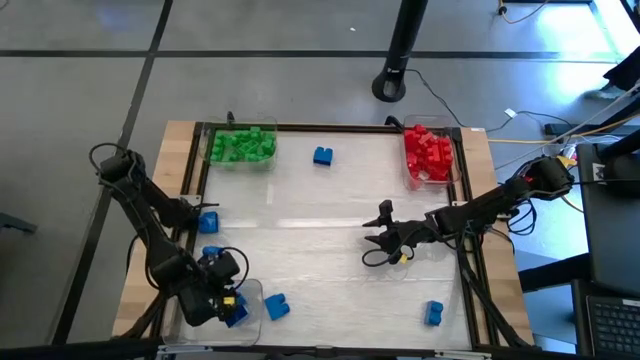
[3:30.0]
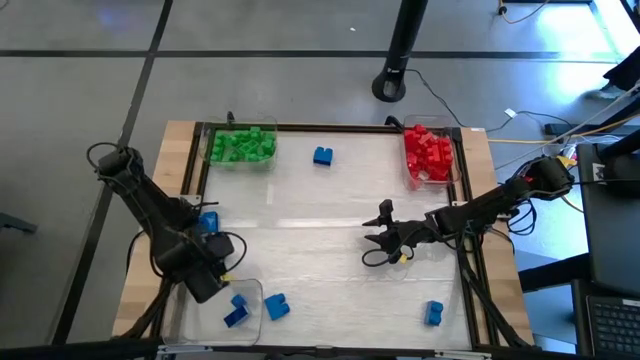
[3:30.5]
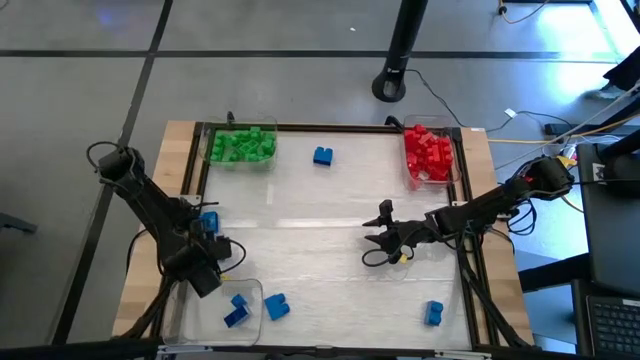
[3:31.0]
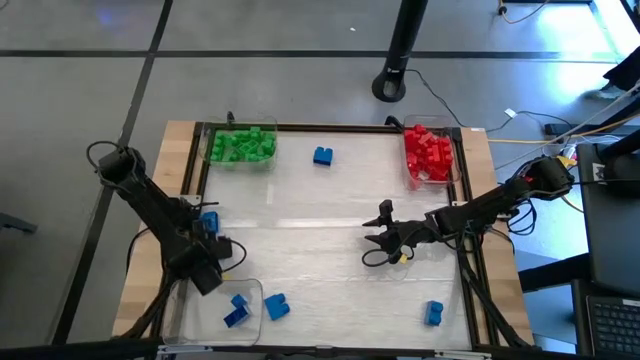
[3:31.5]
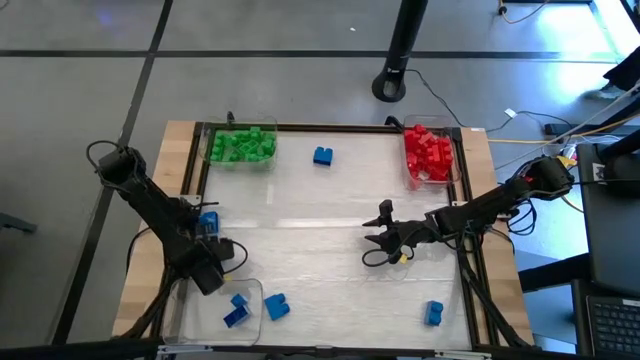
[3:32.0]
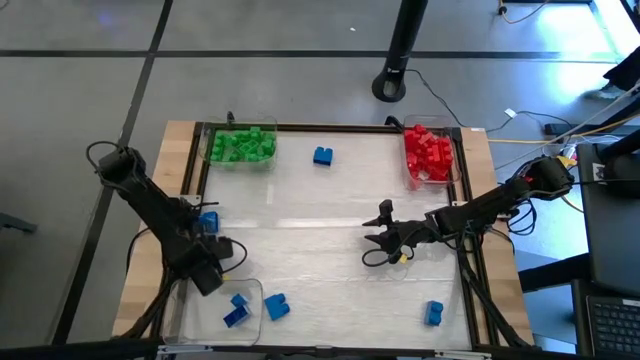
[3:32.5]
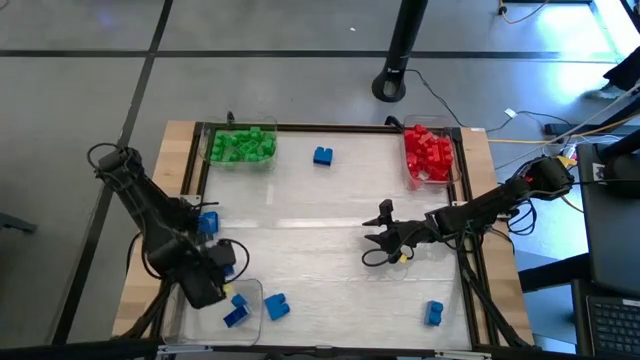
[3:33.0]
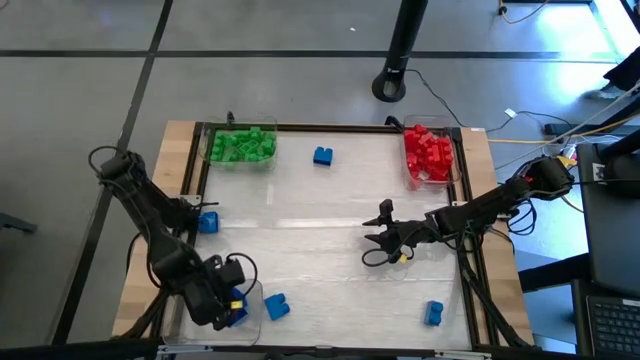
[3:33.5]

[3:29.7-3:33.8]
Task: Sort blocks
Put the blue game piece into the bottom transparent bin

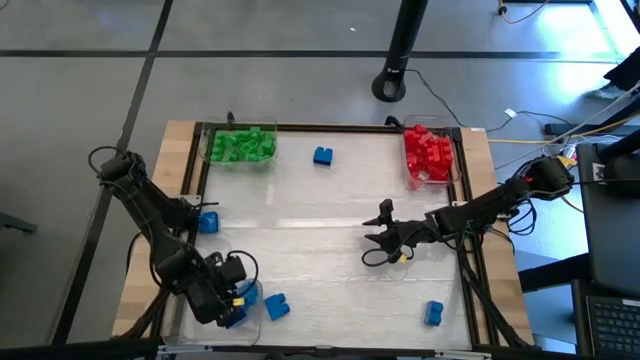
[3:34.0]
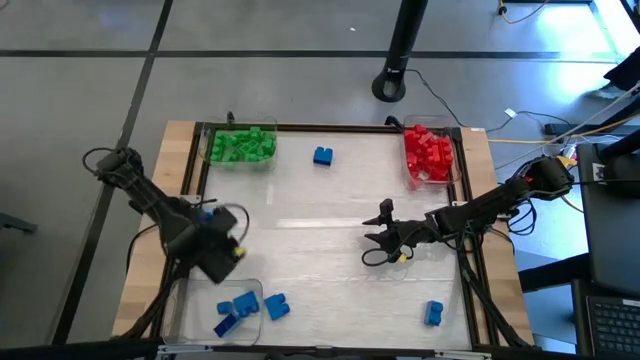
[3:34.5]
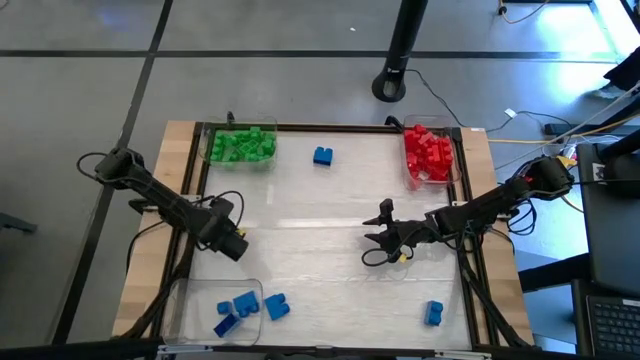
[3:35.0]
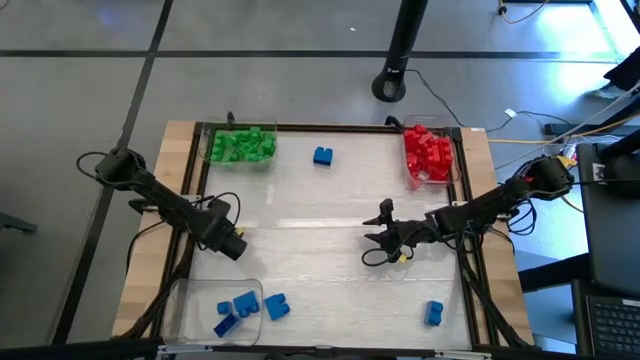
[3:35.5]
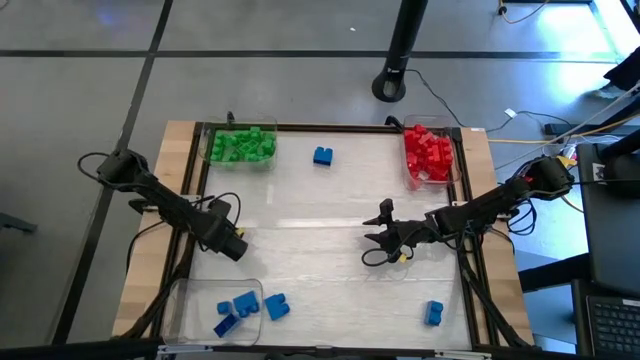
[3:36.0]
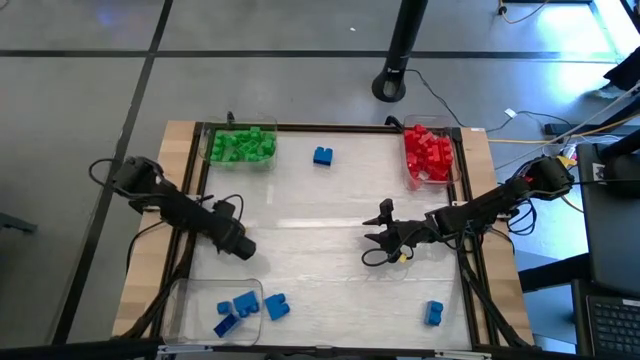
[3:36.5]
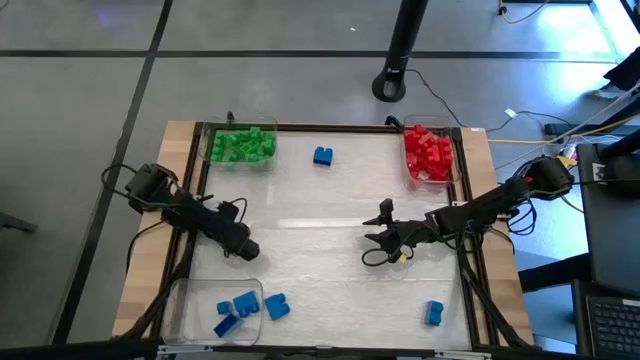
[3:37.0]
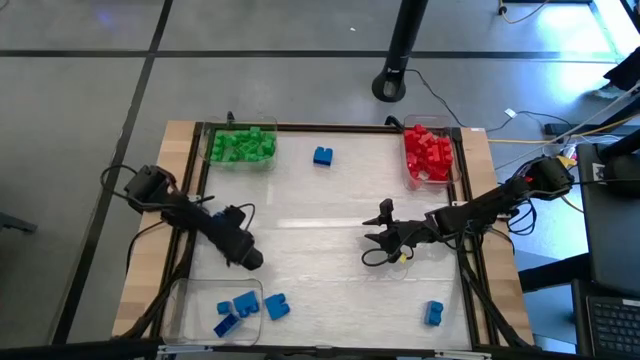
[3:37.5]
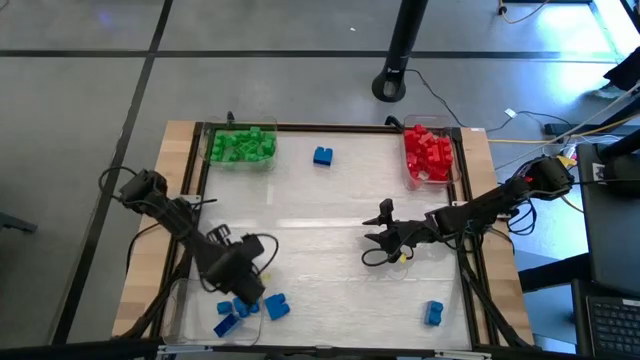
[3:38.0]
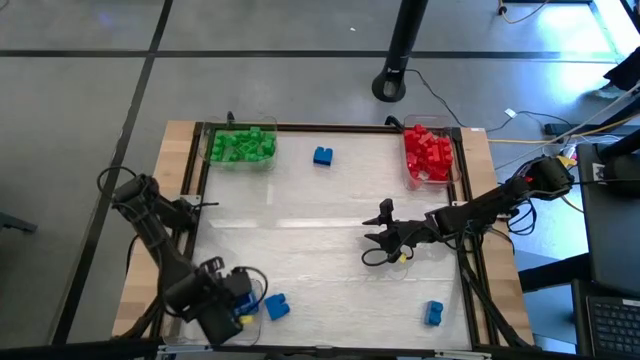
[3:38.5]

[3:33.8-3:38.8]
Put the blue game piece into the bottom transparent bin

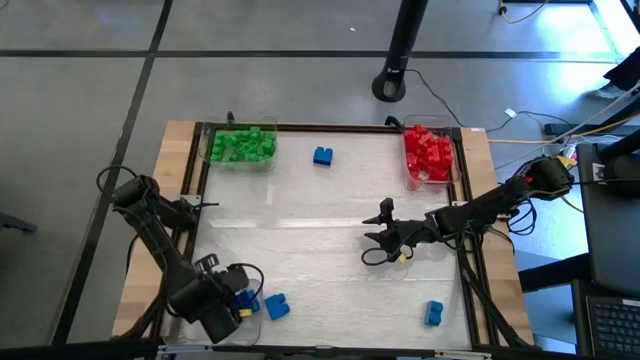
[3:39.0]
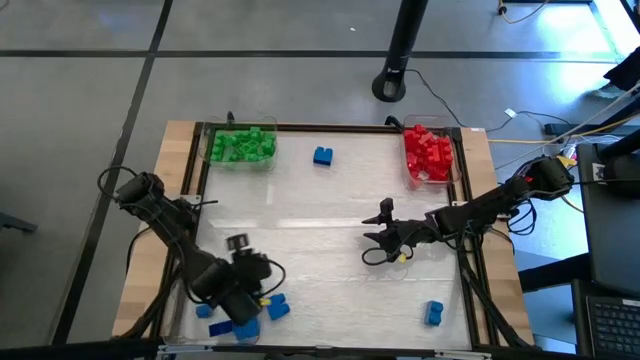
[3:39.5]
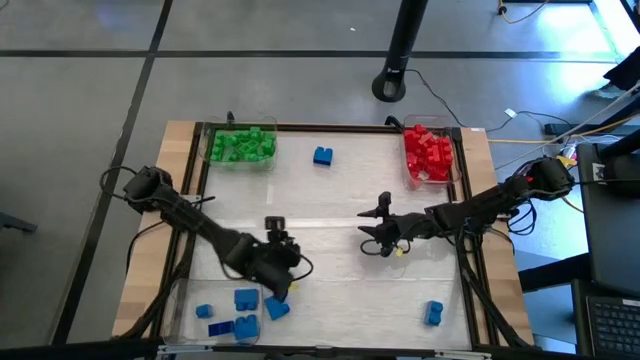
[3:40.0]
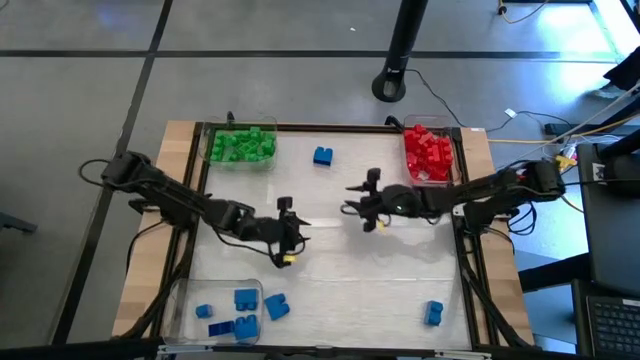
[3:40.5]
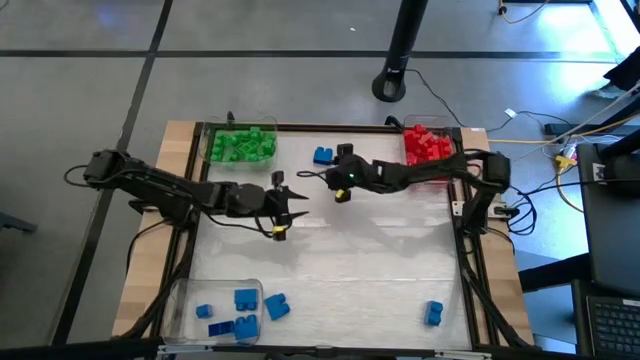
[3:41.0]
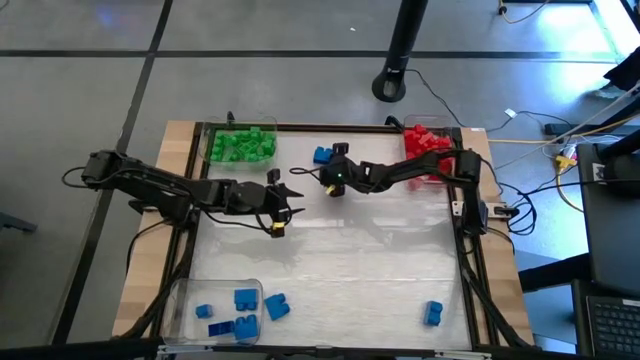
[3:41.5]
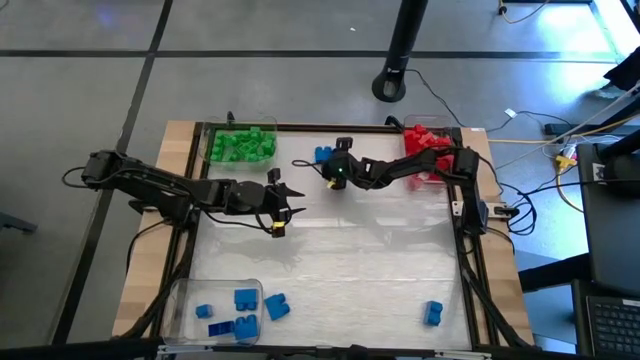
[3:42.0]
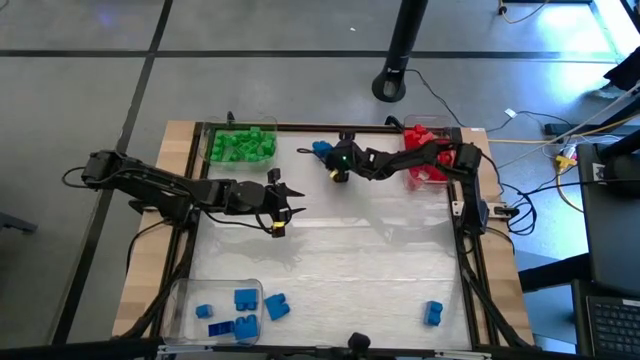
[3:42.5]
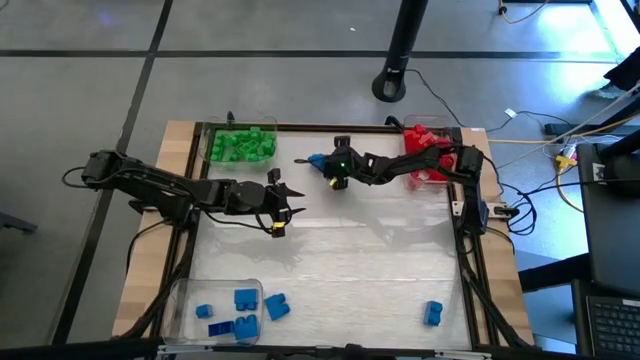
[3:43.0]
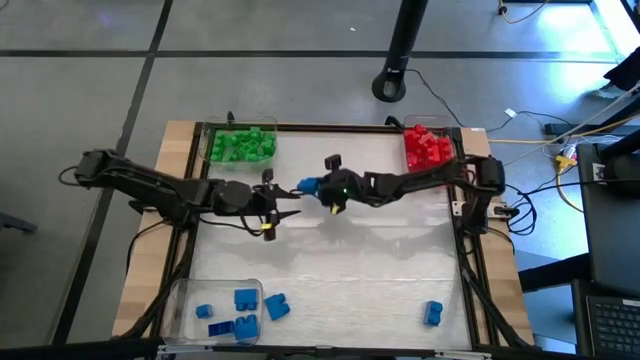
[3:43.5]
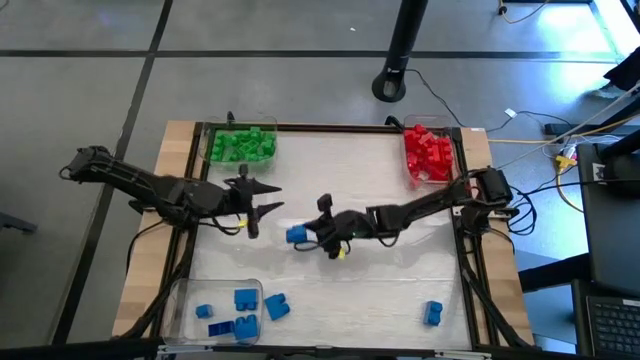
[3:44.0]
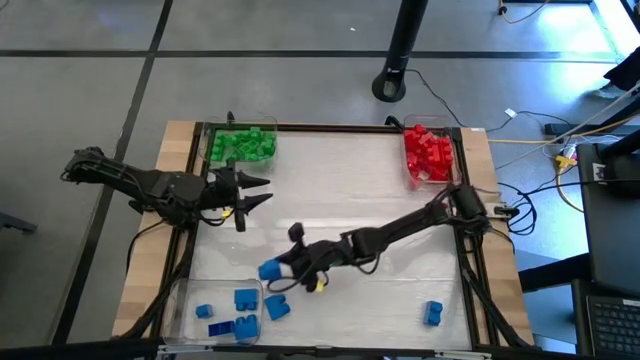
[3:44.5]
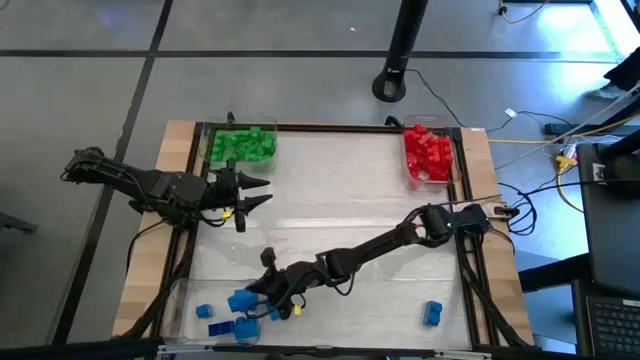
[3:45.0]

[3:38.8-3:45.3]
Put the blue game piece into the bottom transparent bin

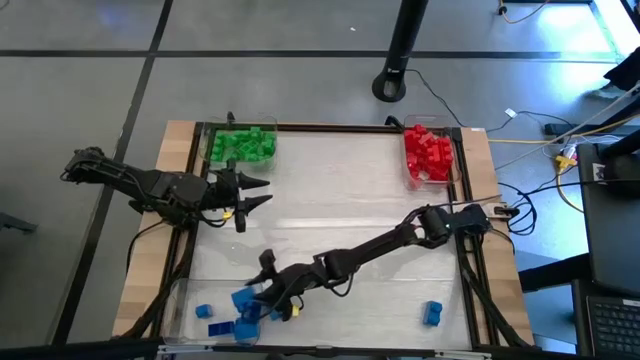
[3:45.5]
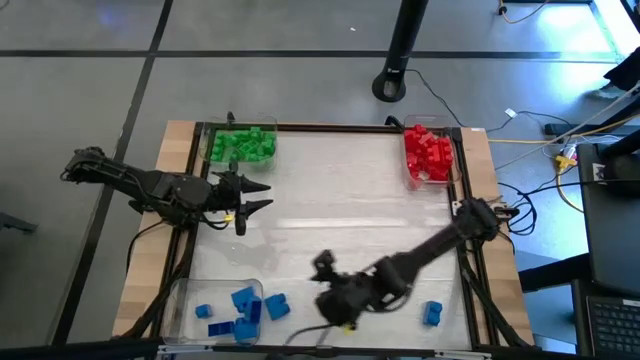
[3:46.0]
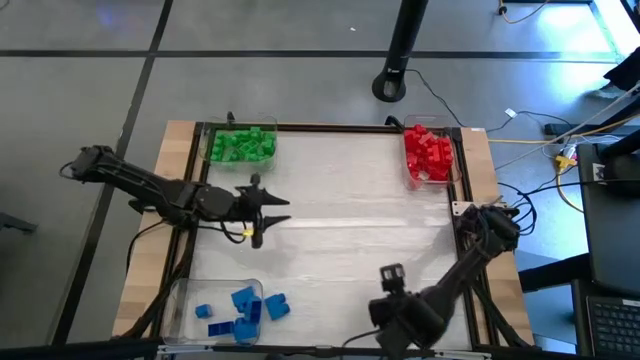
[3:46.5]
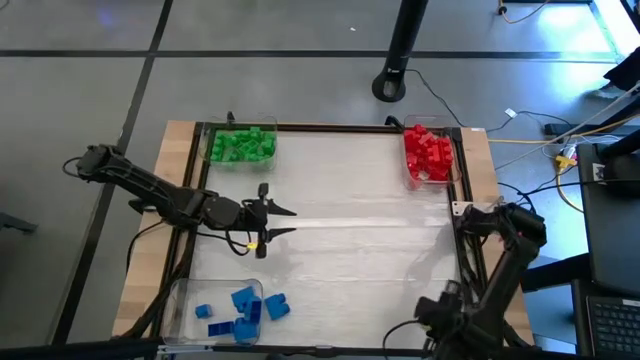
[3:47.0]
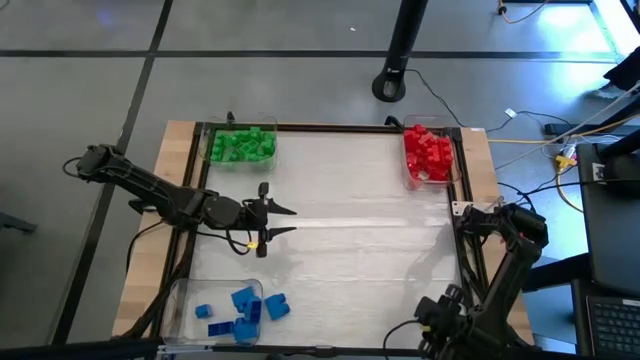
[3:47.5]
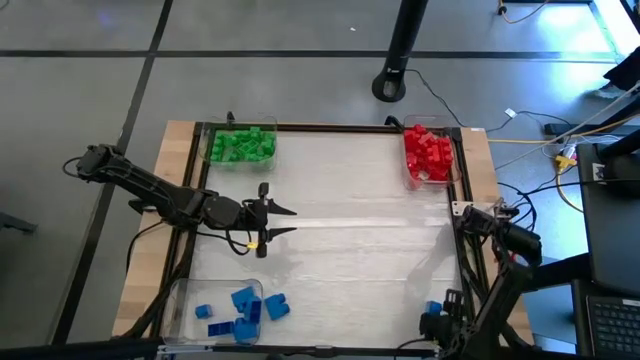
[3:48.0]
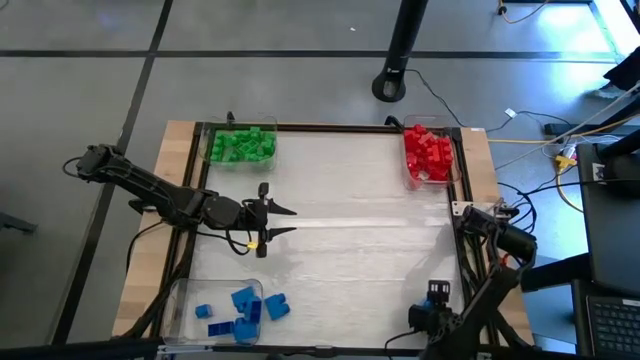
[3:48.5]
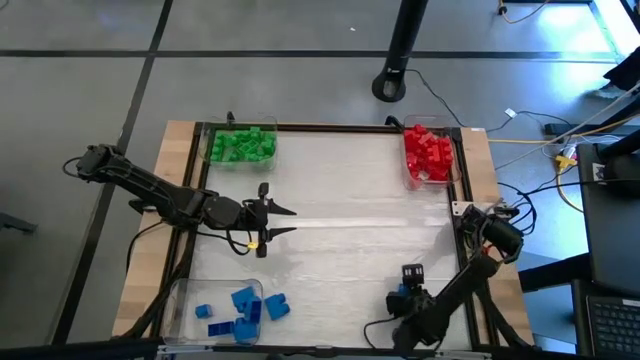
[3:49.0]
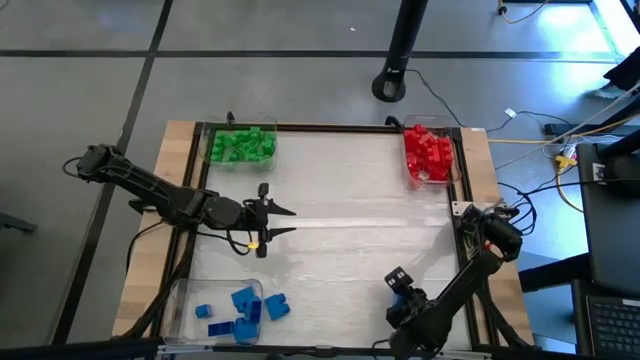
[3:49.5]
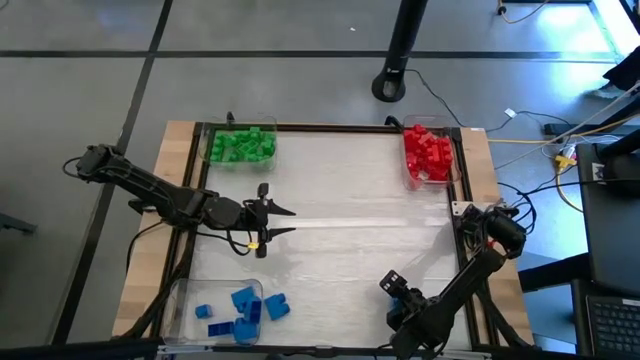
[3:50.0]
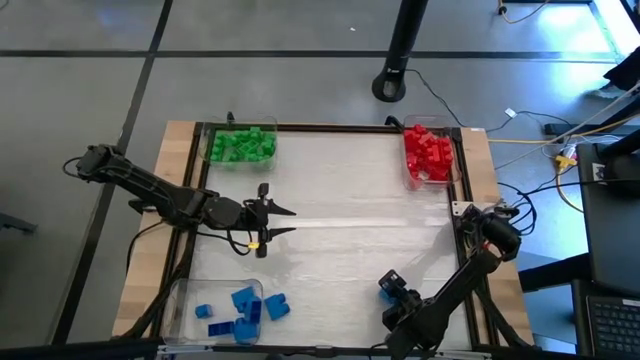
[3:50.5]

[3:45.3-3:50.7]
Put the blue game piece into the bottom transparent bin
